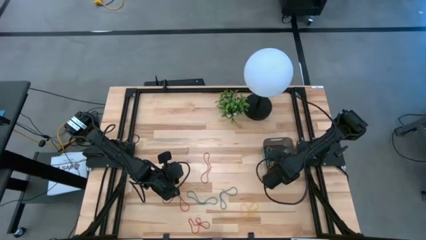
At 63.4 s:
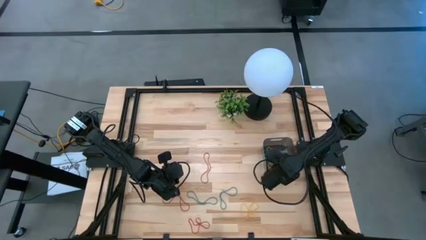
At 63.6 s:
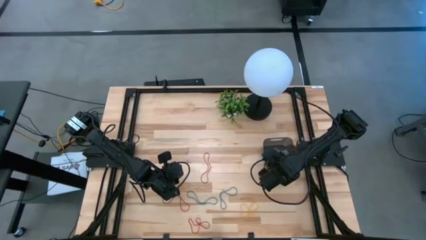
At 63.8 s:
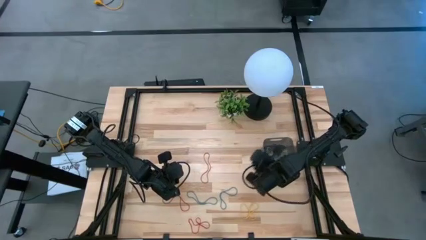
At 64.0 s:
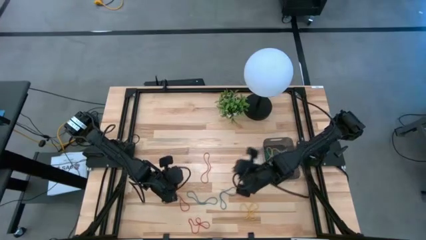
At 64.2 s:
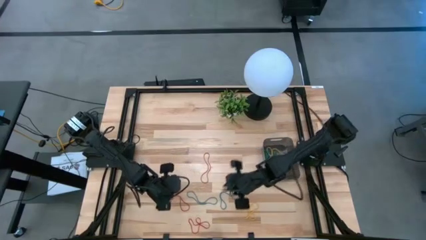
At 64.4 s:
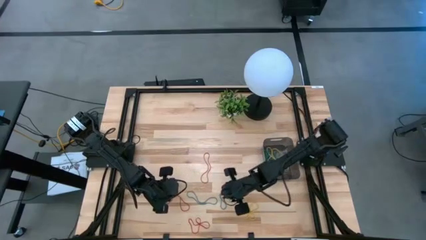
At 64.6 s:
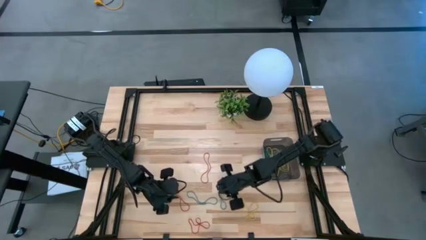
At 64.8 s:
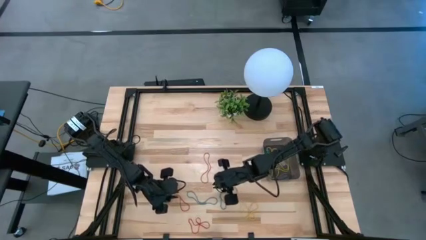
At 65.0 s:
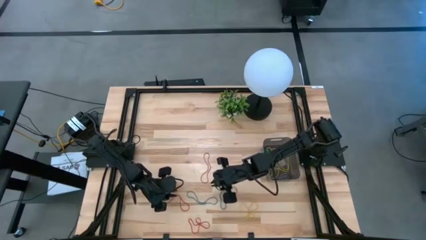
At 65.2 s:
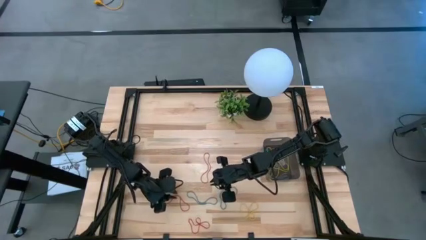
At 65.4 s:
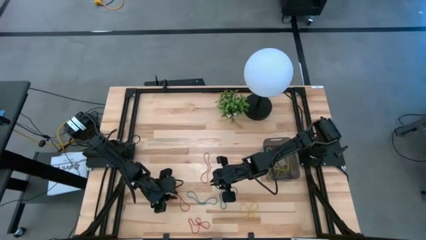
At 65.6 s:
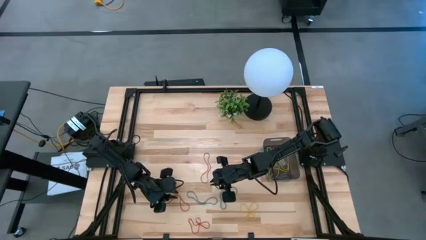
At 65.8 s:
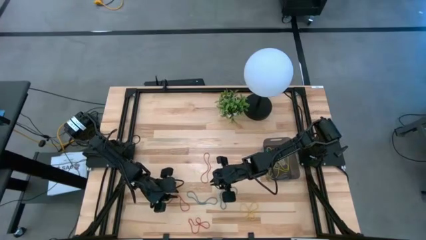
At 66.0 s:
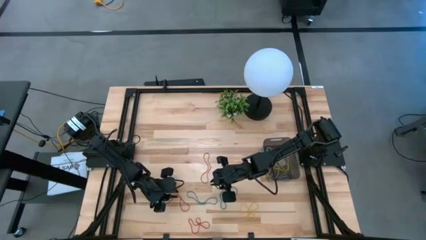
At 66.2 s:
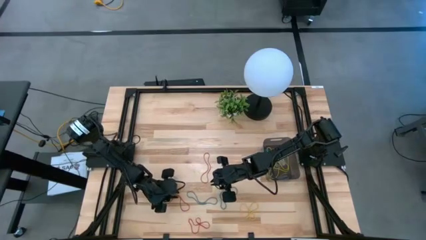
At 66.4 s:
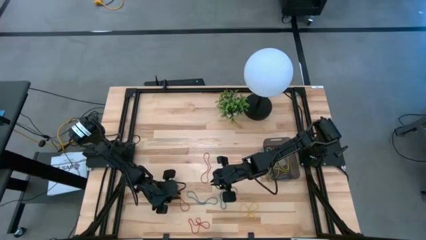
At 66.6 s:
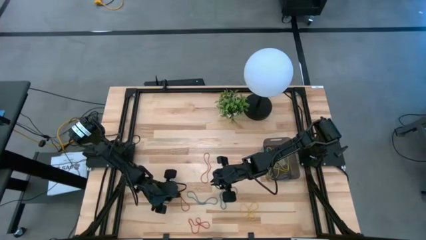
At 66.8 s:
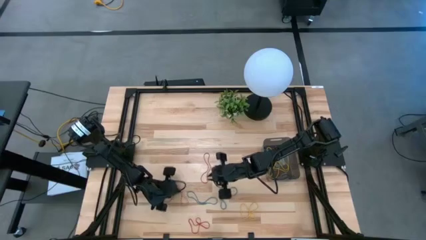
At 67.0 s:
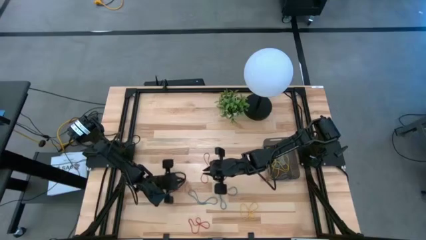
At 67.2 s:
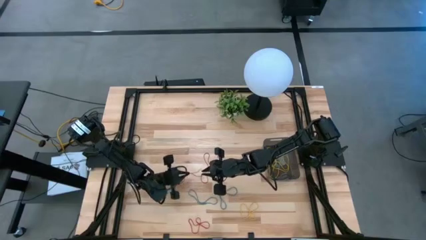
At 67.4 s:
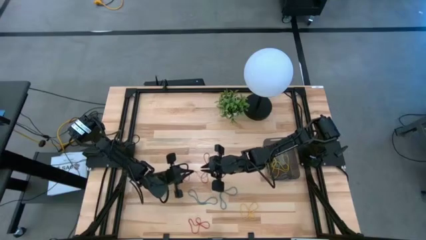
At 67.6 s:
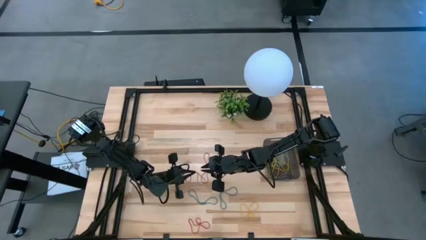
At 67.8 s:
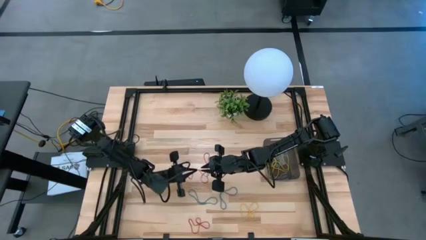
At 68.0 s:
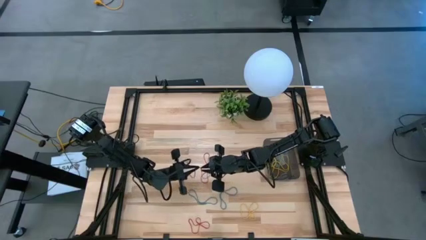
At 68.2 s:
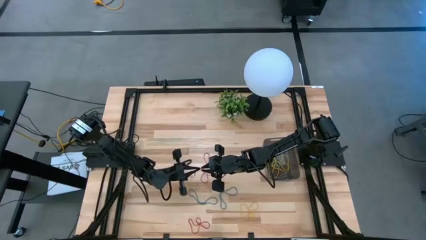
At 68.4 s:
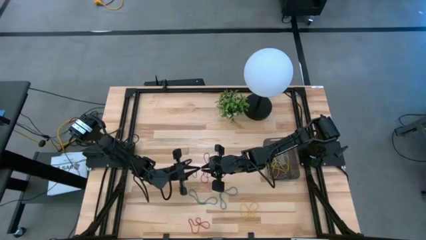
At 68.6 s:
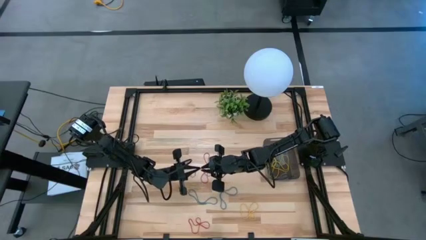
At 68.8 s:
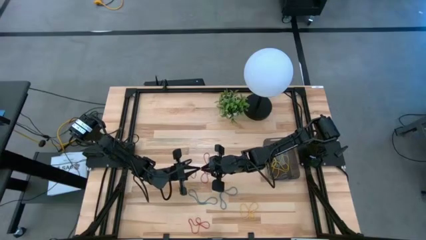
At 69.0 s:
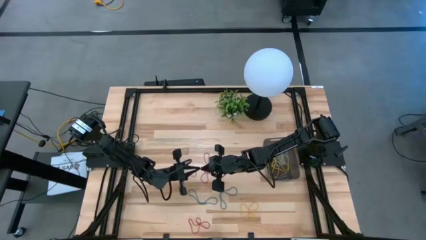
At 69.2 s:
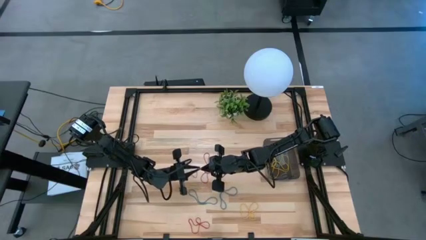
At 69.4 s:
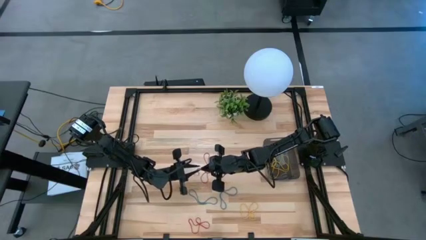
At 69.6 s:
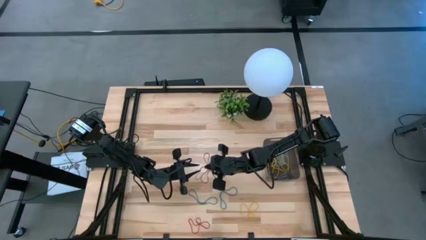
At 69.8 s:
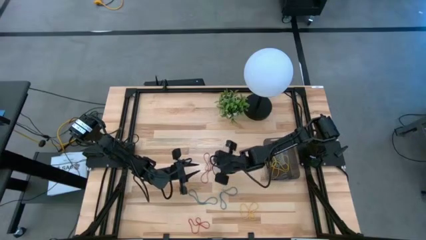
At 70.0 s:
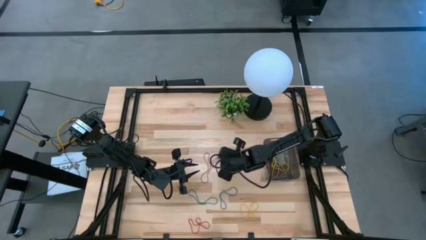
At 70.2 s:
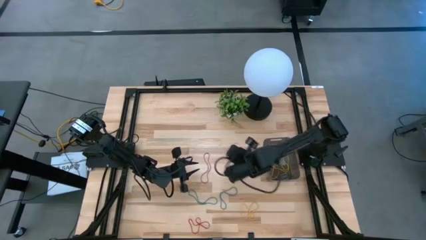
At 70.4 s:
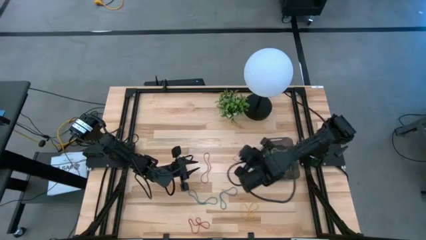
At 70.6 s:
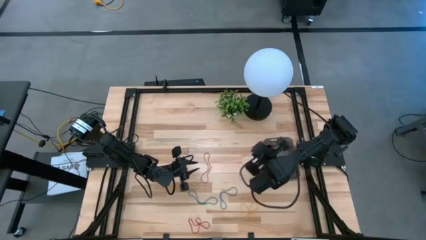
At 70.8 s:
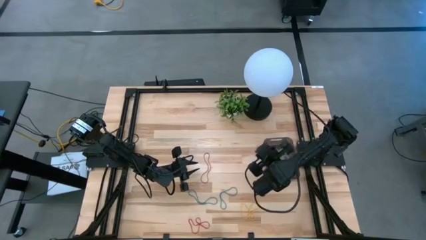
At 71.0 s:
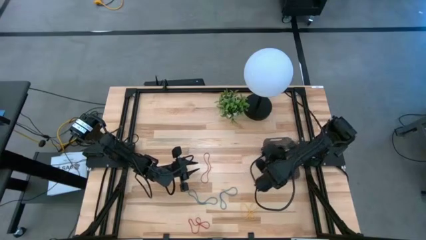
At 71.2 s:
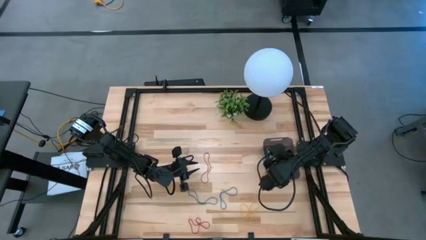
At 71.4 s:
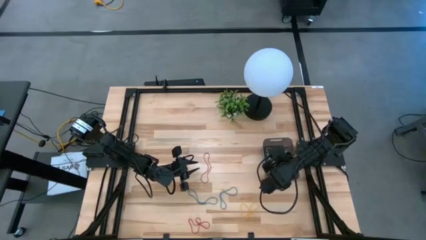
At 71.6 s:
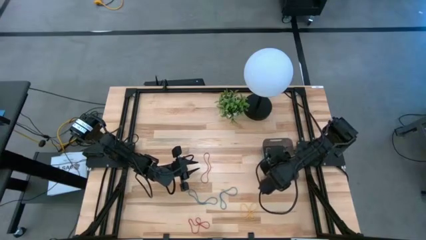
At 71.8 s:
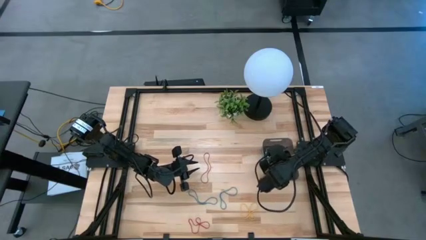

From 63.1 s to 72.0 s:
Task: Pick and place items into bin
Put the left red rubber band into the black transparent bin

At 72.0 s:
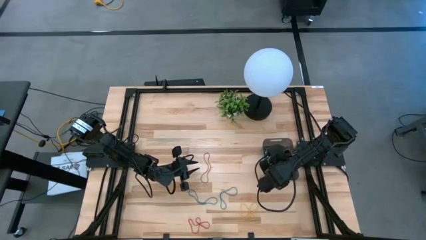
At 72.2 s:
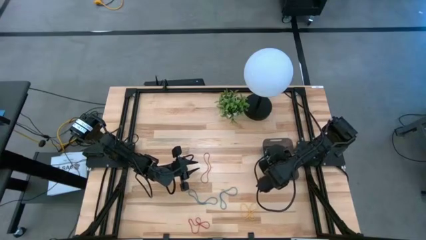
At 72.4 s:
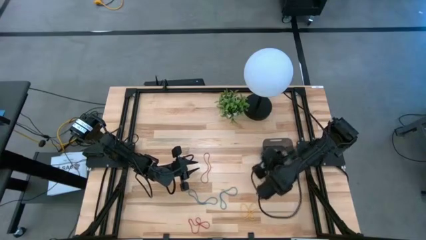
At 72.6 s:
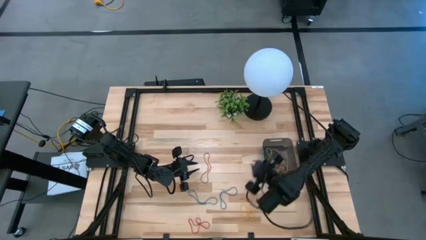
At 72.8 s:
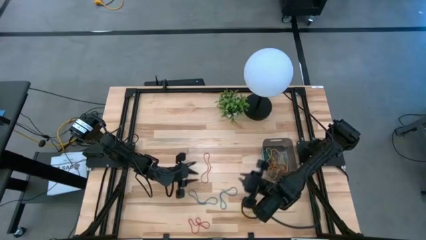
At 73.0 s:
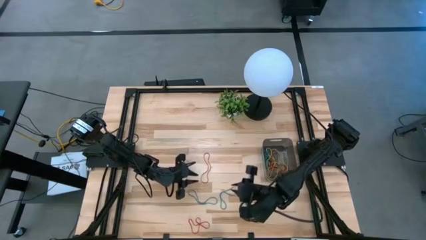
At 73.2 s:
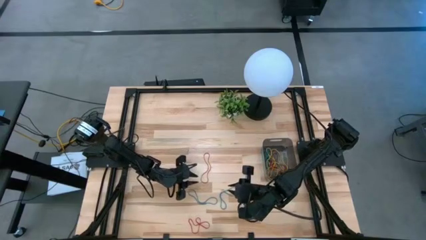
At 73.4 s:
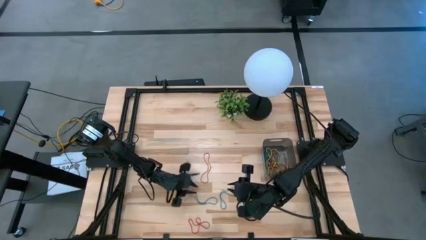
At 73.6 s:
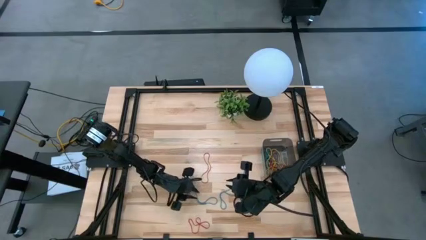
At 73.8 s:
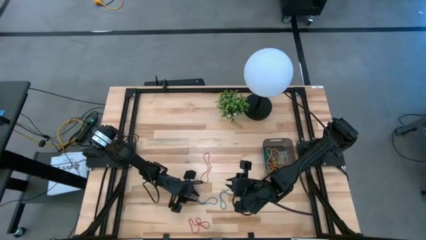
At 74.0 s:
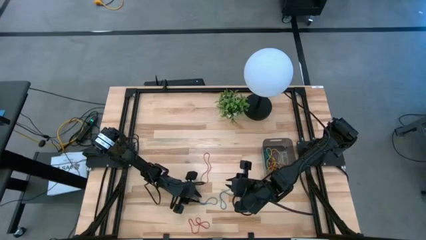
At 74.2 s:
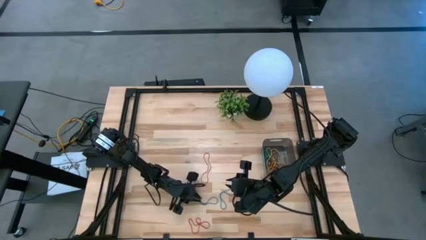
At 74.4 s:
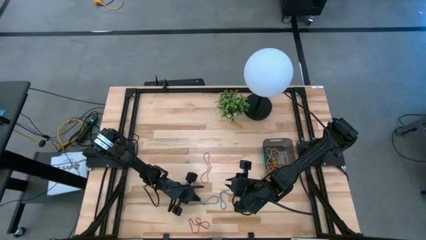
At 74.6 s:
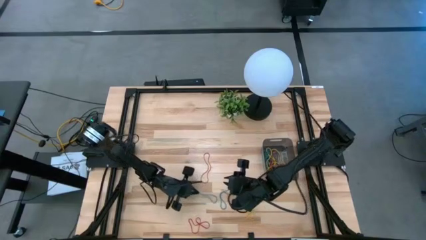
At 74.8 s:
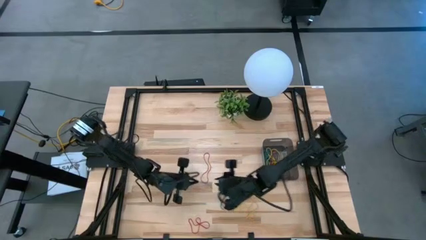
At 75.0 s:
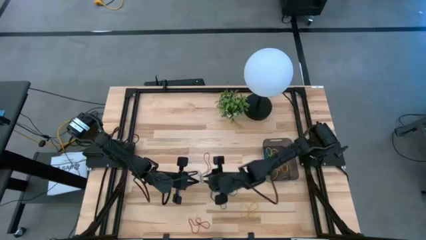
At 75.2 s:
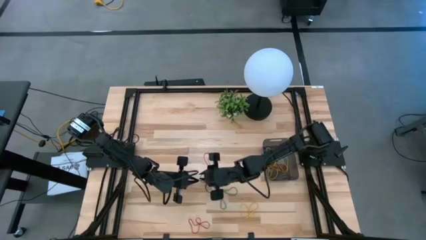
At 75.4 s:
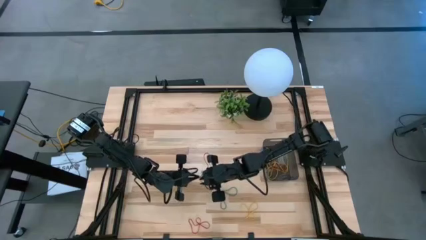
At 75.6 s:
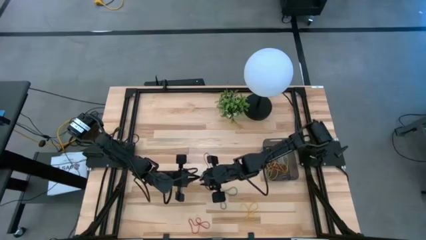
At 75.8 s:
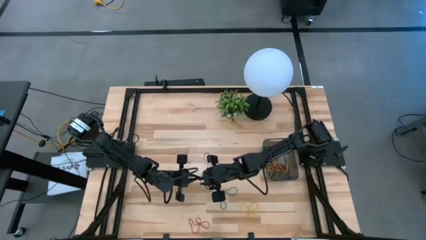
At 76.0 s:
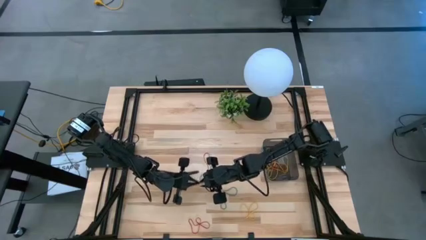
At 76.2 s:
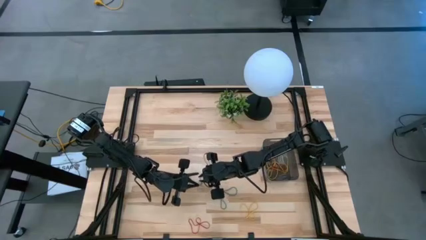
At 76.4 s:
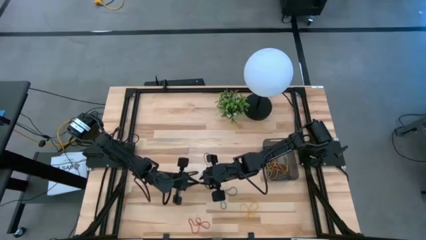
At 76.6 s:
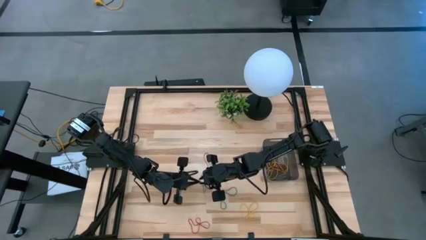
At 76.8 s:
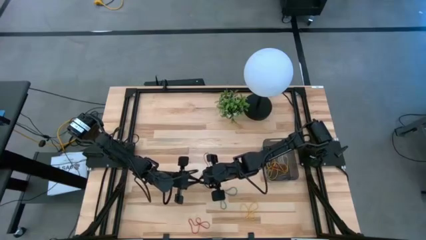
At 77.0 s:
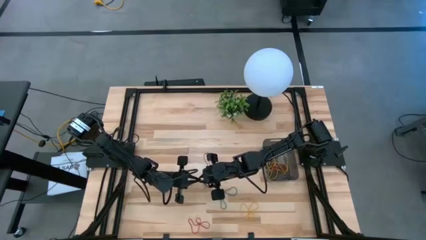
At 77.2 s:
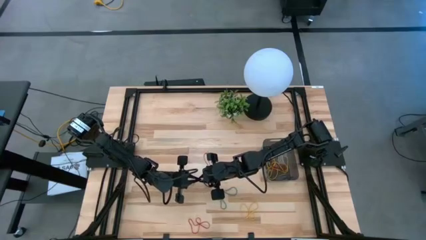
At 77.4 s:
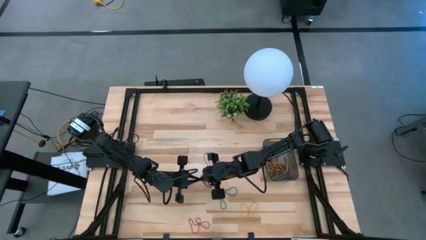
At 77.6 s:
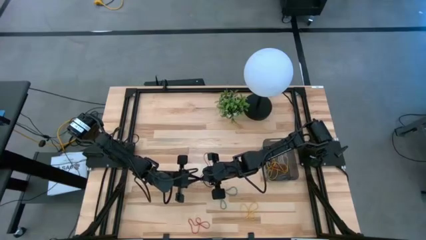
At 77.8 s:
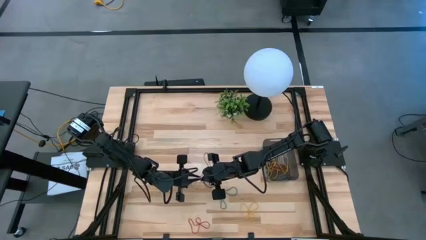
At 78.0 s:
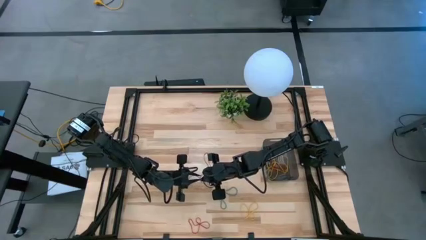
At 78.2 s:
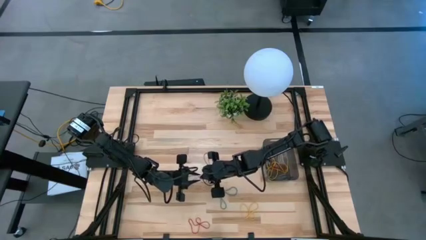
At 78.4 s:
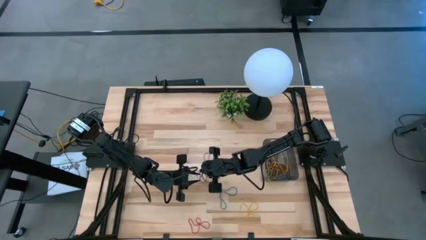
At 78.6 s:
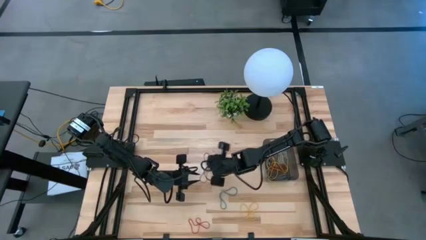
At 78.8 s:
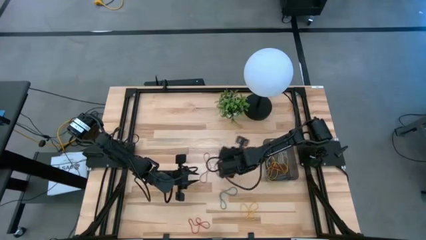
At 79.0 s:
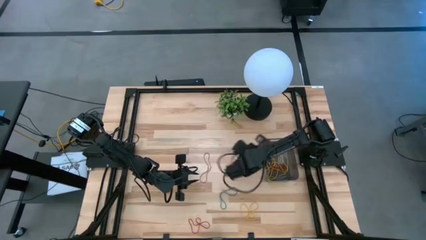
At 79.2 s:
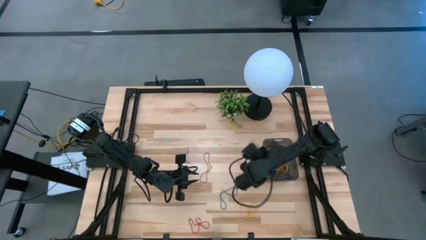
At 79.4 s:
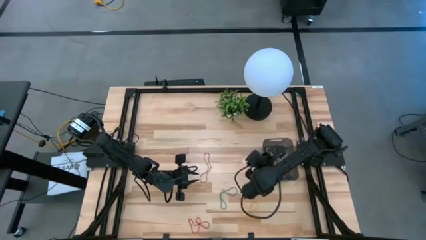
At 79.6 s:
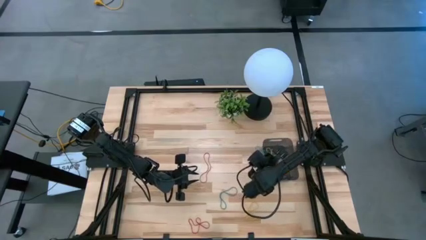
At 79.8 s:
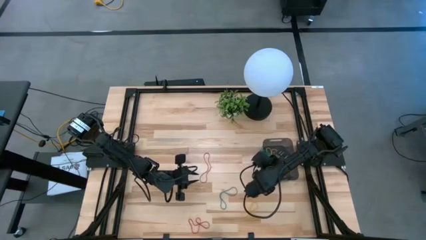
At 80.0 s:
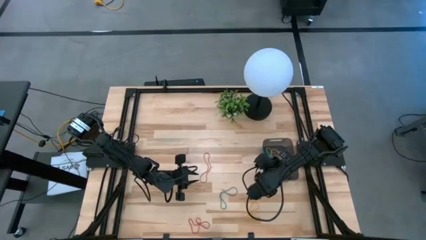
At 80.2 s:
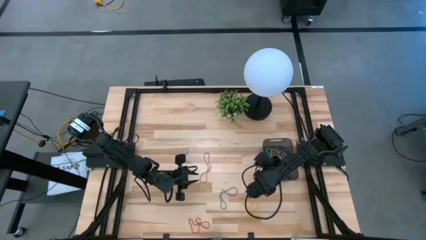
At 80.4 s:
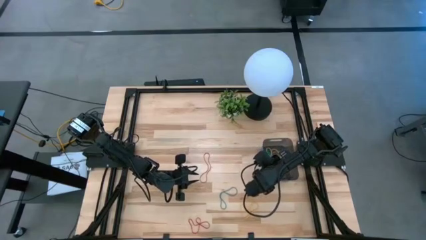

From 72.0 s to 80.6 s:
Put the left blue rubber band into the black transparent bin
